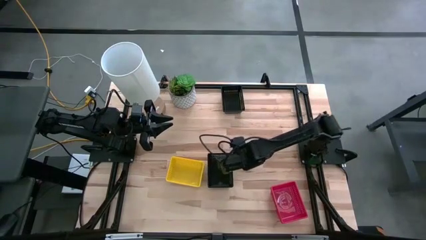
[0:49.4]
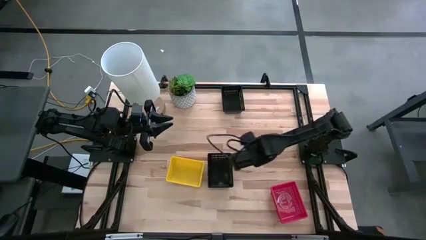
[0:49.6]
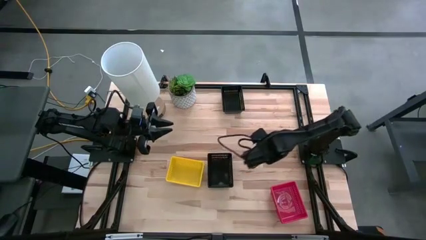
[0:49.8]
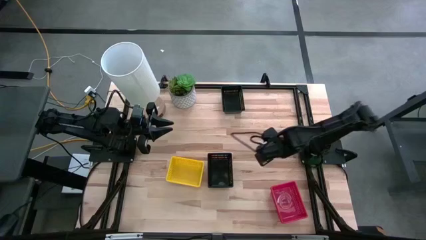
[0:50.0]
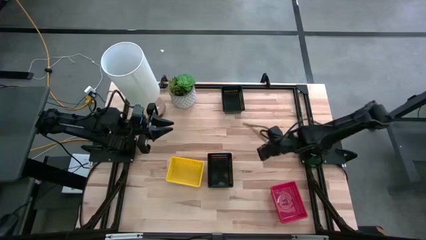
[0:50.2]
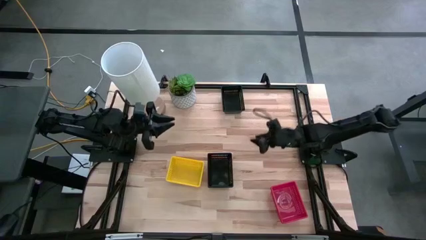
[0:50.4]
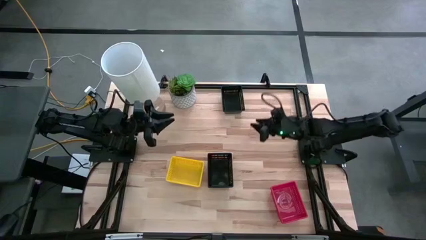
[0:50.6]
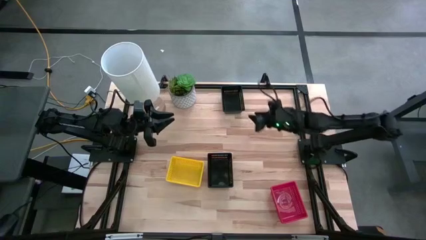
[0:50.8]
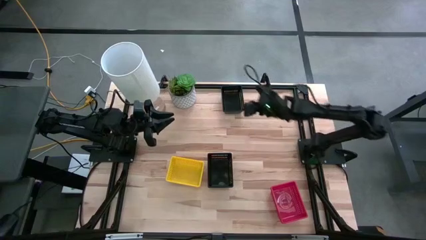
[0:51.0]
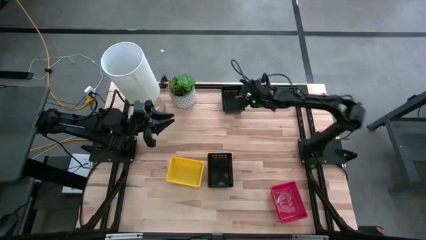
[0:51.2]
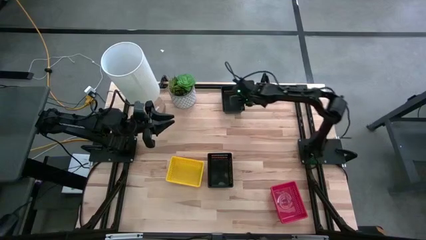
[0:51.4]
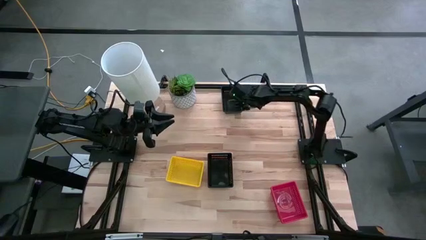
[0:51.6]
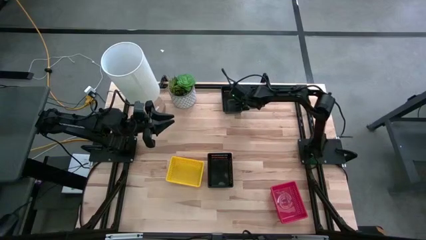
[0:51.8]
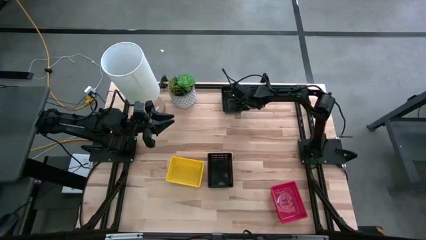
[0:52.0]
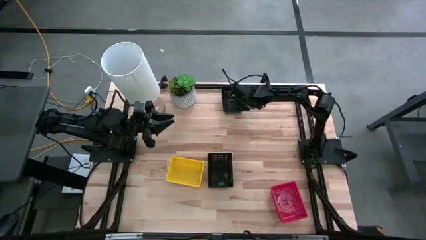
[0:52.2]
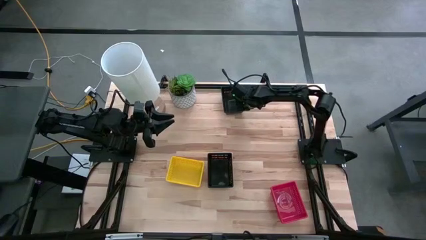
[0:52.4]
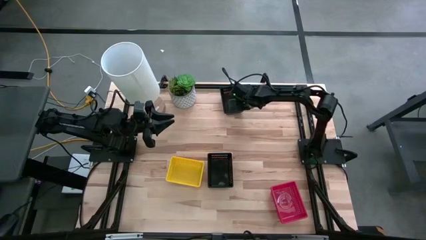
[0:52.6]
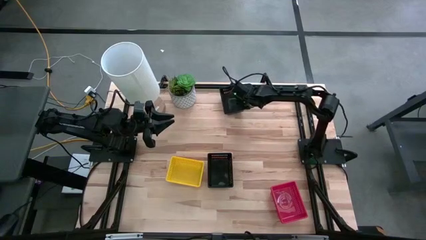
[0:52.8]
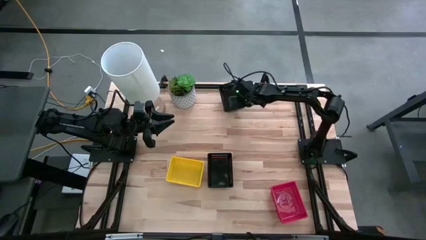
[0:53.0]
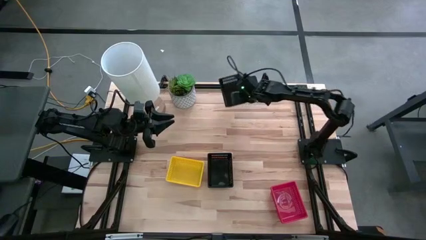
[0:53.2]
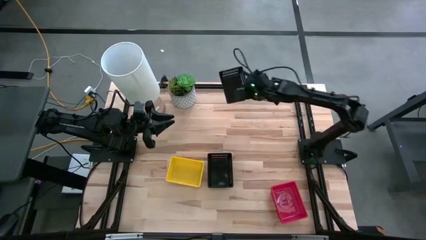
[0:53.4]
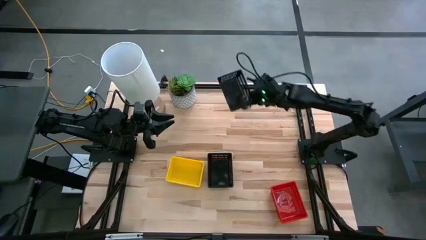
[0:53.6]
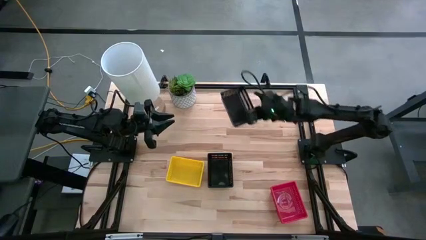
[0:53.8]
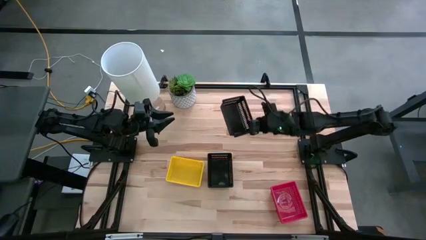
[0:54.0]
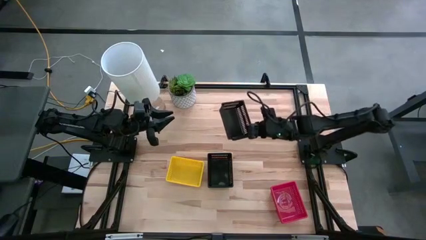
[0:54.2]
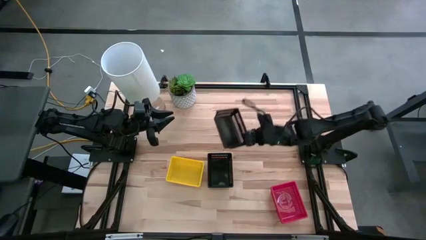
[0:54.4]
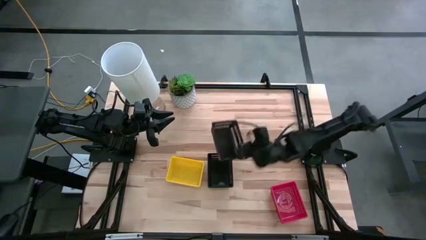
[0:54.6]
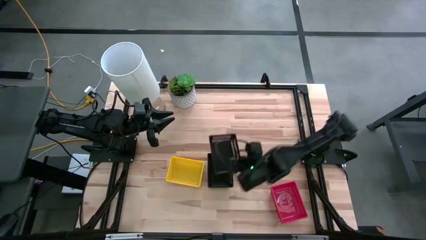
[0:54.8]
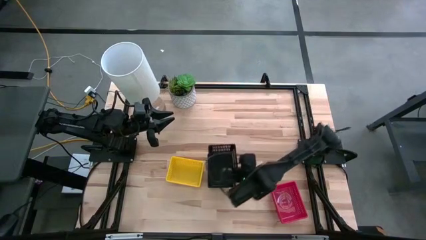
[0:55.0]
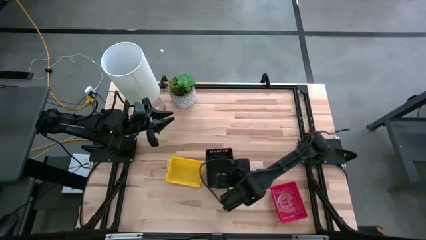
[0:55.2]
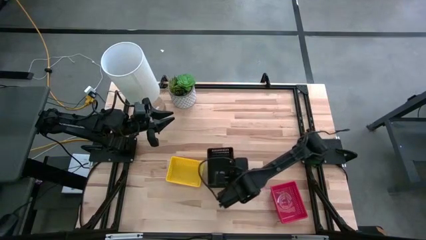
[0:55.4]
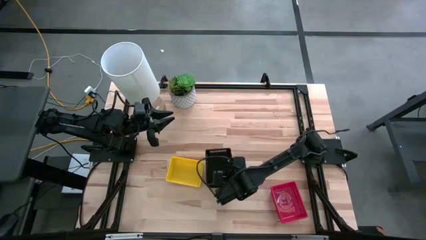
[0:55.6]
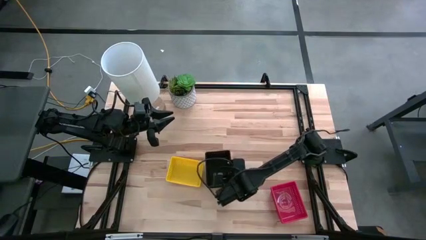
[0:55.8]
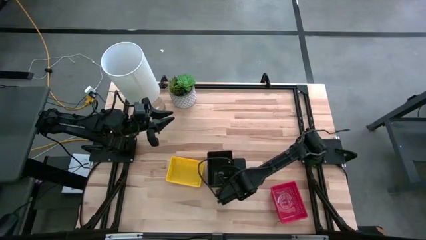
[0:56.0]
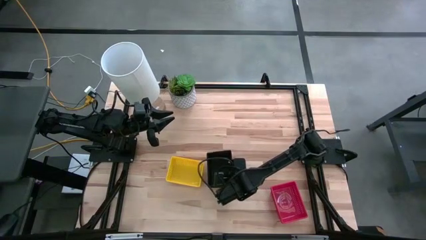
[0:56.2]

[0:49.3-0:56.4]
Stack the top black bin on the bottom black bin

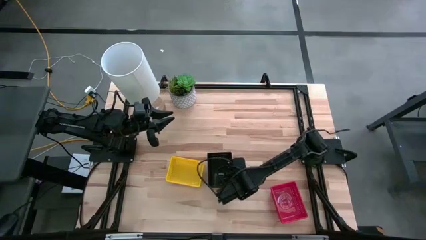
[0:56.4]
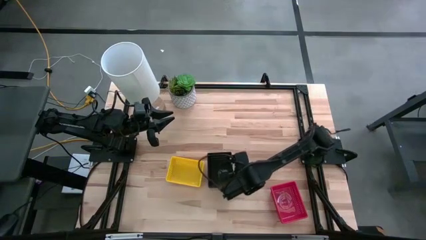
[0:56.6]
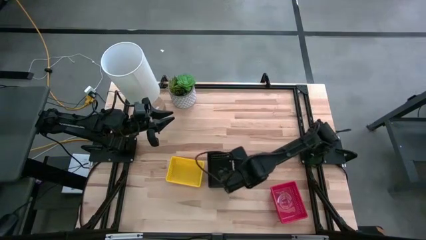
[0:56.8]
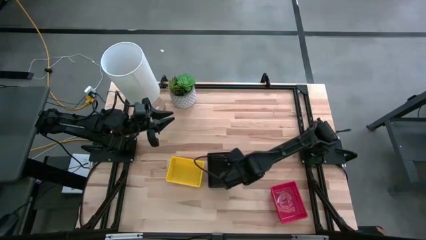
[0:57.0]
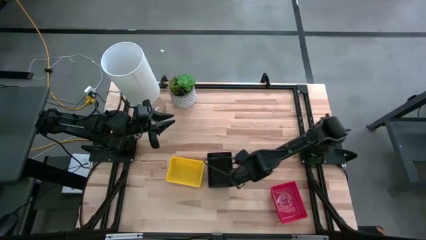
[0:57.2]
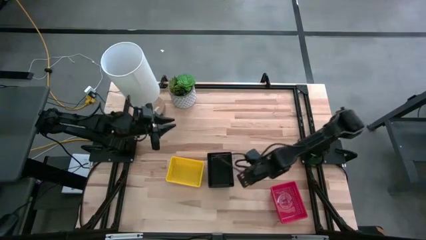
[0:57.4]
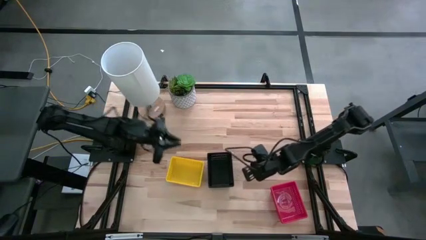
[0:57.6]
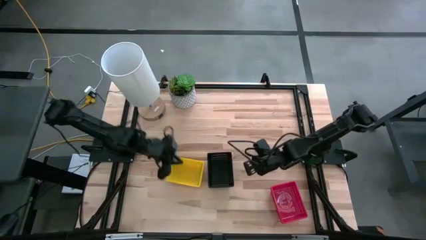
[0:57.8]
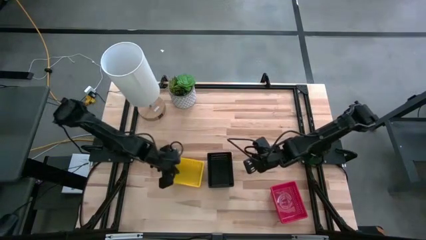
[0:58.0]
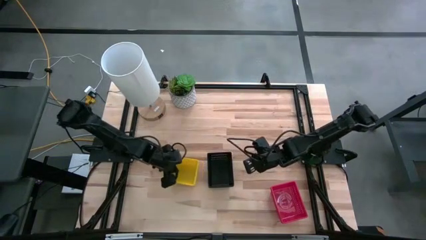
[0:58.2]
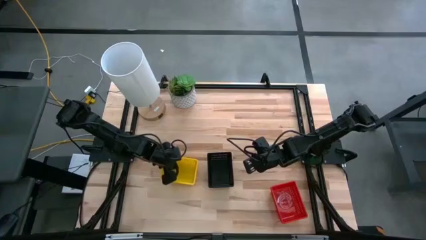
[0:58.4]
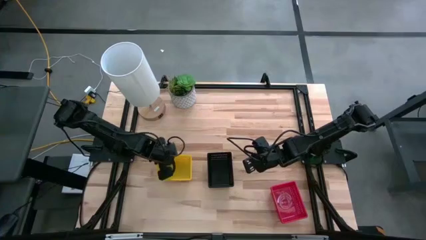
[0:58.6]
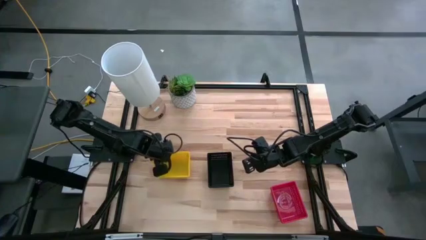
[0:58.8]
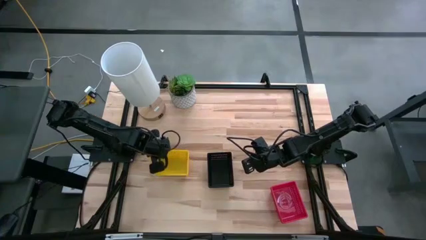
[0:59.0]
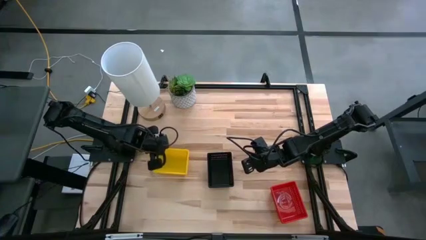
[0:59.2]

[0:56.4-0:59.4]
Adjust the stacked yellow bins

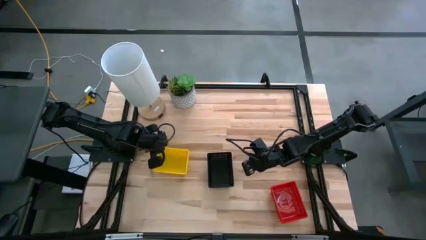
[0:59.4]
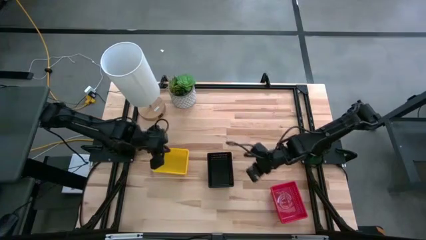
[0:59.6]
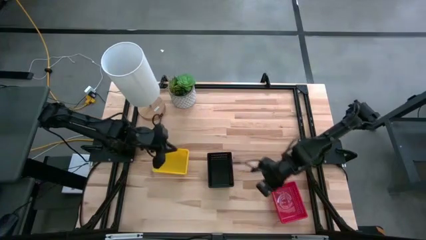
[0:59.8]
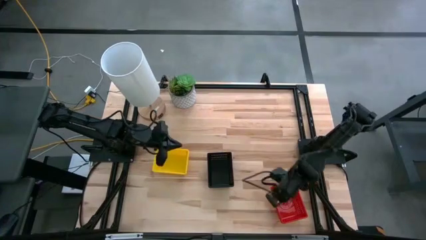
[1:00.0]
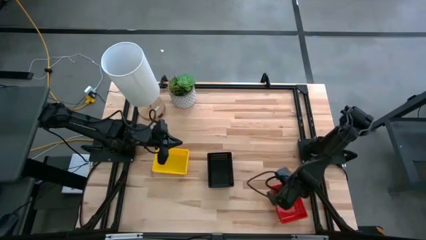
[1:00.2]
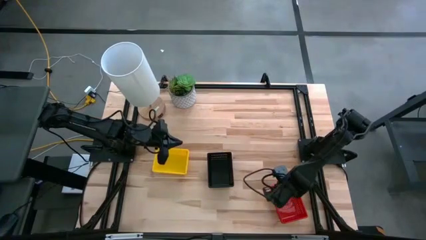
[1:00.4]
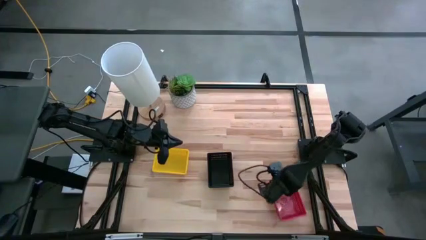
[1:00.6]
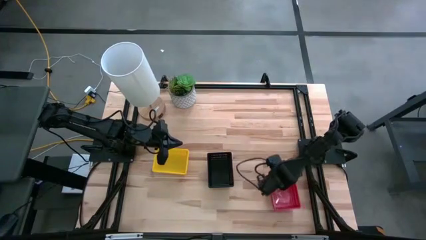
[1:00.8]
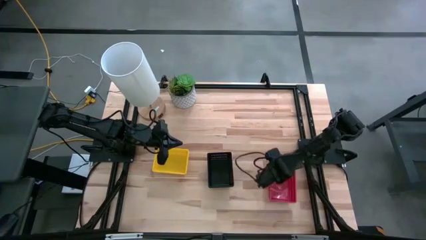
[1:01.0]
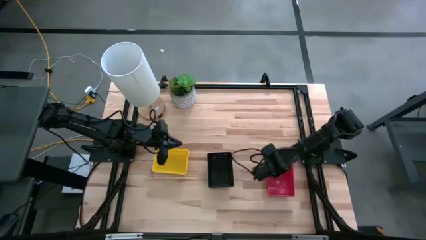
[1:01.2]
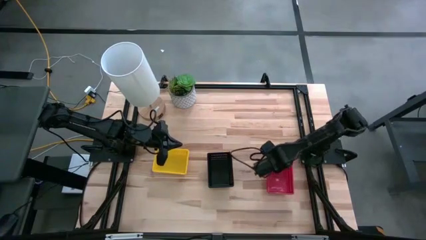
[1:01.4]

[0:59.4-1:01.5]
Adjust the stacked red bins

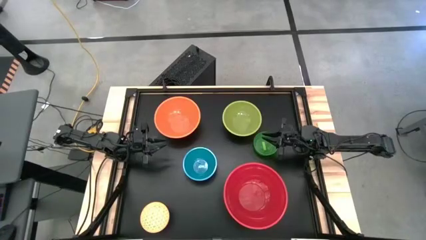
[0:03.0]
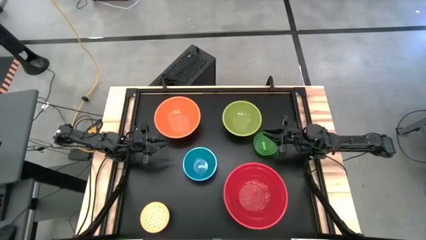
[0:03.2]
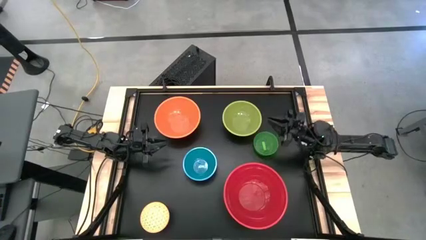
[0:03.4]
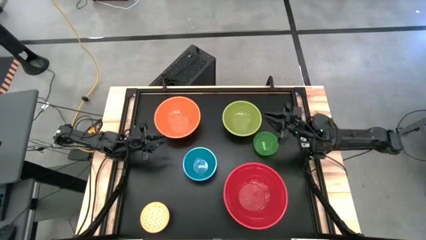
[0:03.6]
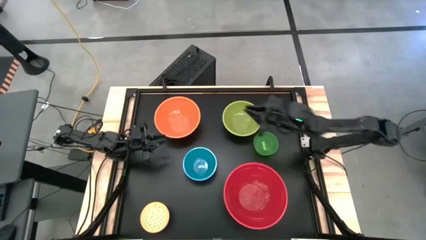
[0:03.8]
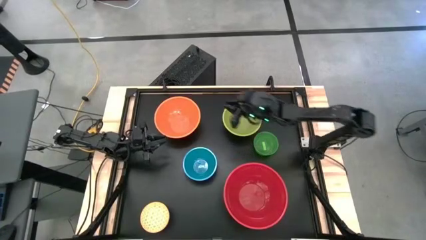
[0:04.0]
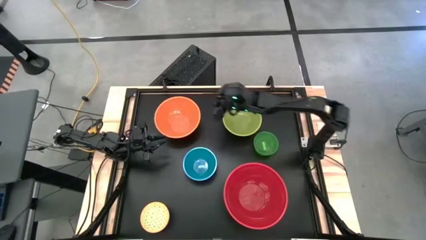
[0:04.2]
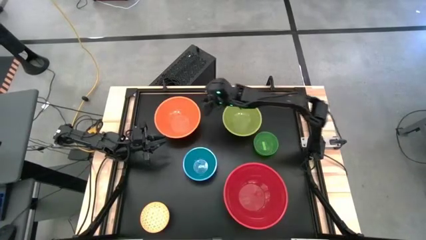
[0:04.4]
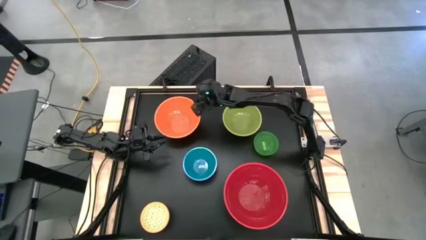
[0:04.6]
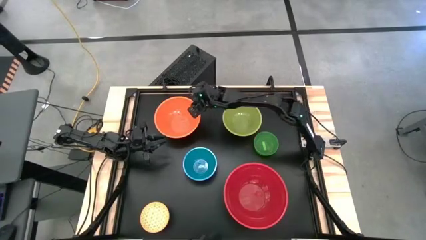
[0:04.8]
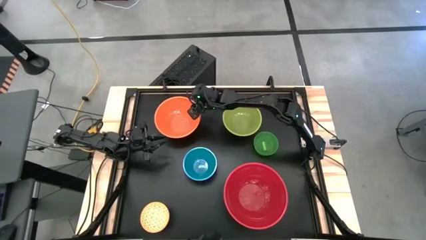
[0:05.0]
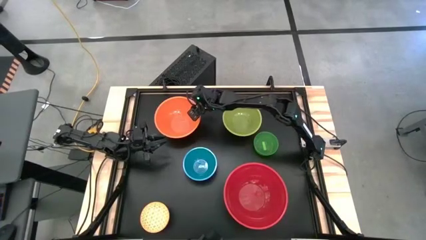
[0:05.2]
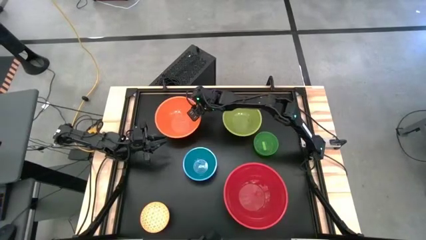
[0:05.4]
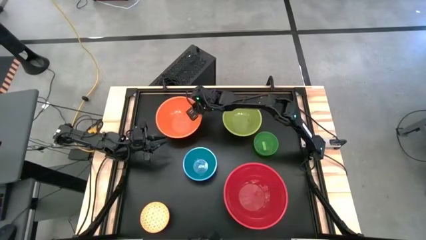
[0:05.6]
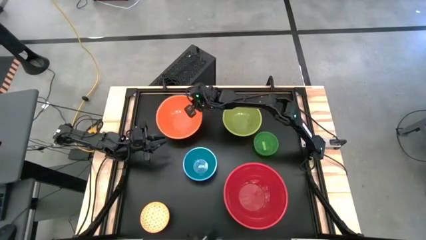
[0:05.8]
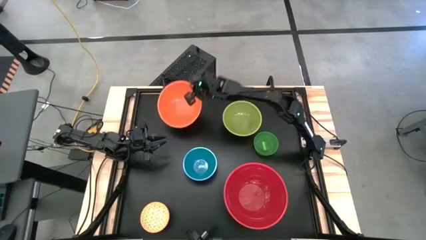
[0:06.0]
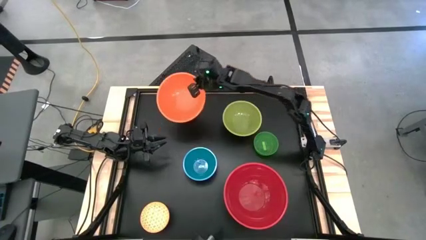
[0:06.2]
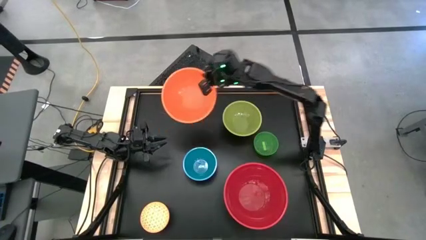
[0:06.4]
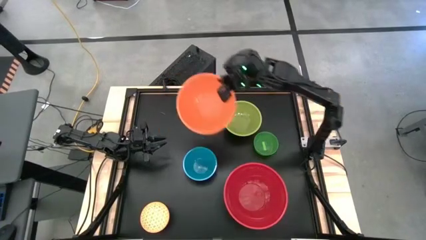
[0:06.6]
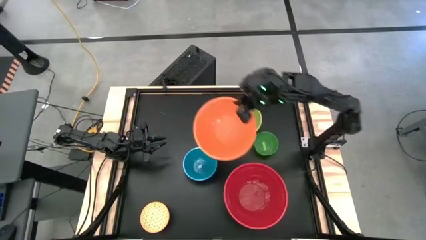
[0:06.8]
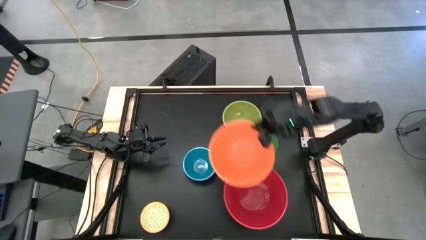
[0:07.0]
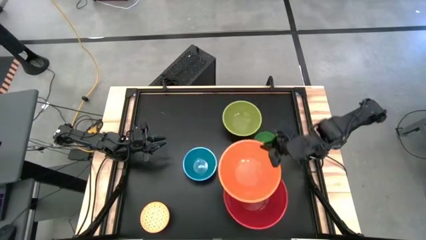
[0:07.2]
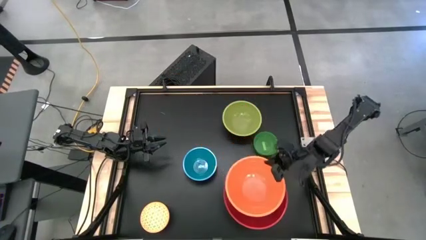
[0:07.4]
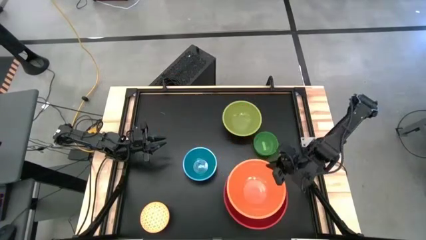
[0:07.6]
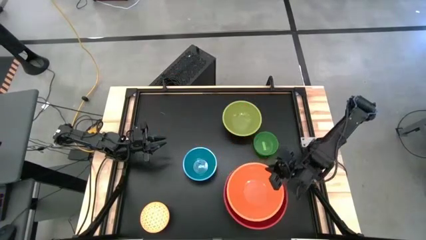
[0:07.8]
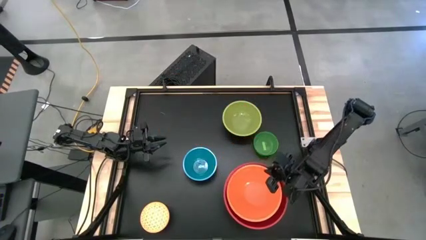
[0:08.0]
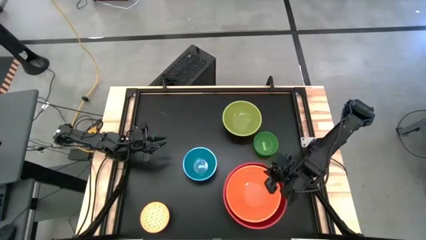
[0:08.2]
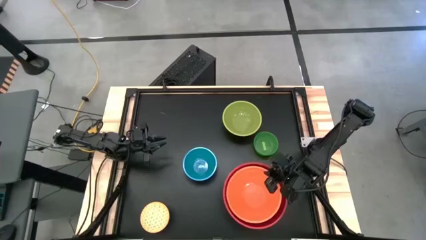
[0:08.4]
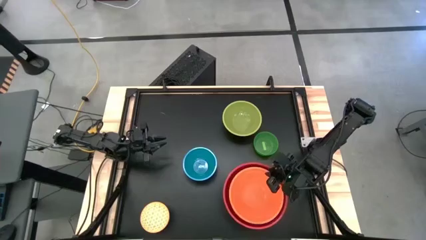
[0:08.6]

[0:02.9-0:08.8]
Stack the orange bowl on top of the red bowl
